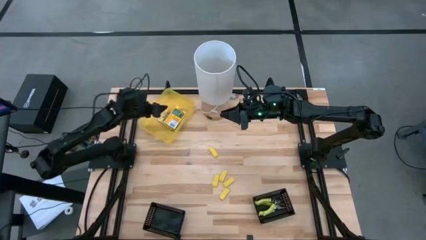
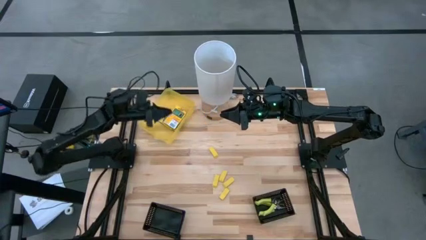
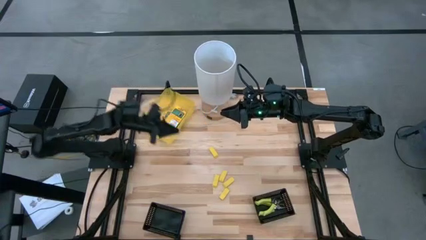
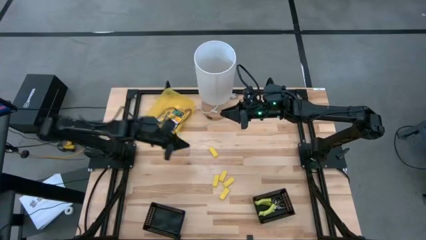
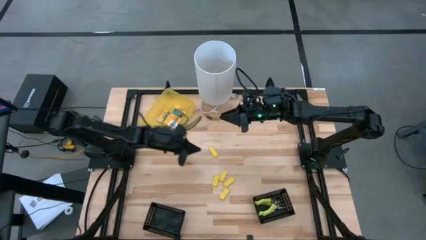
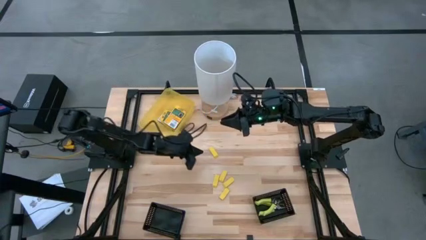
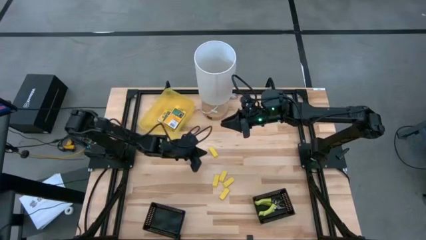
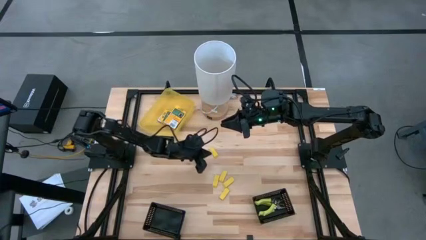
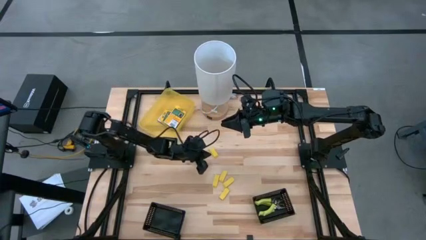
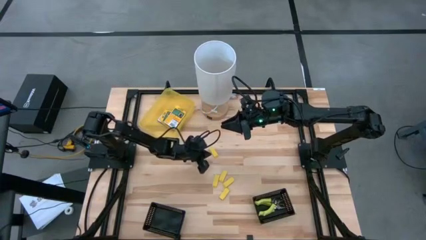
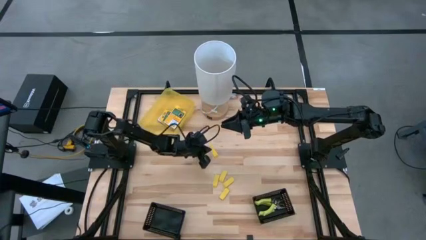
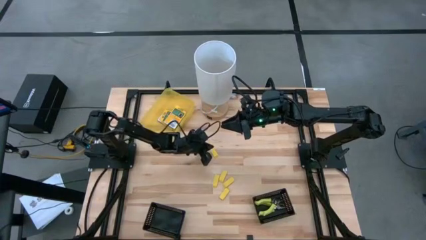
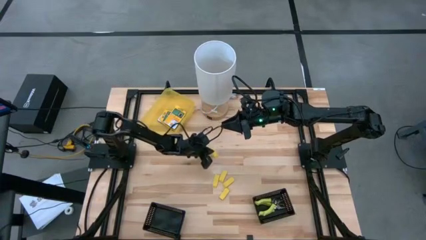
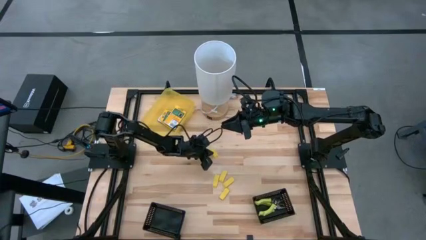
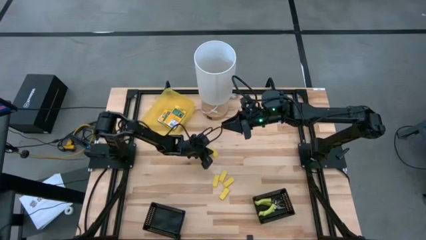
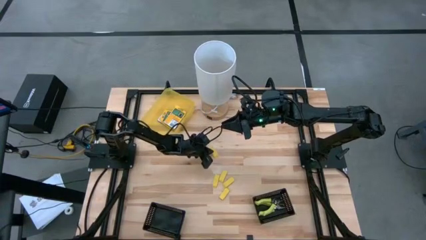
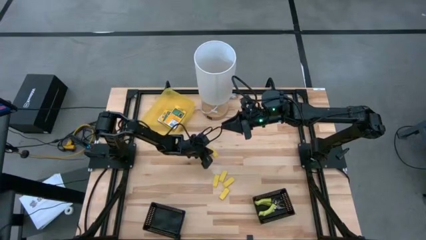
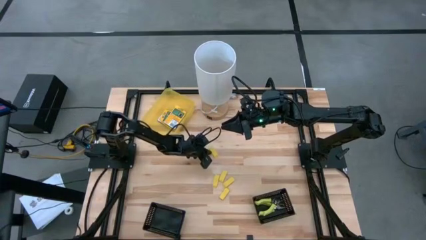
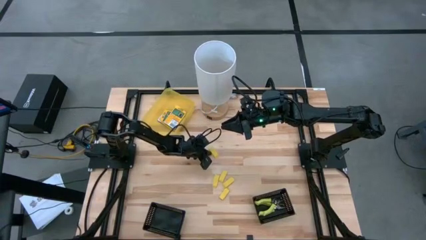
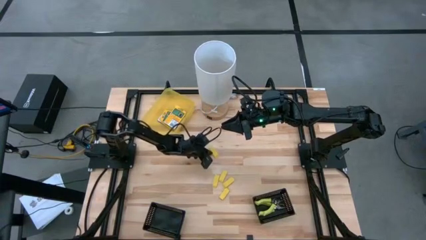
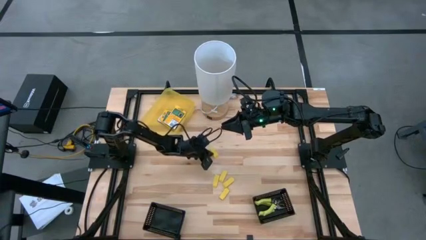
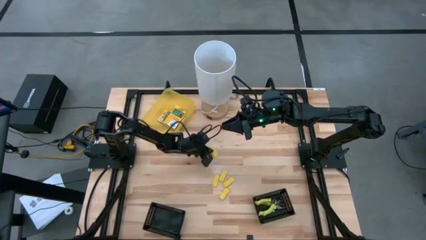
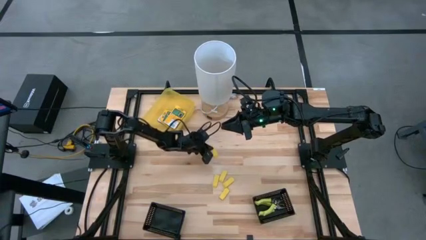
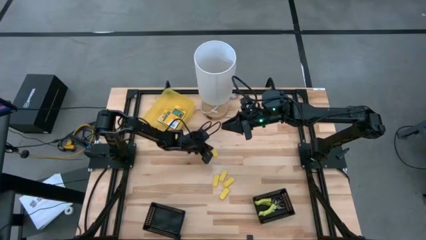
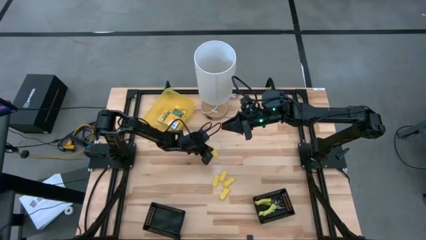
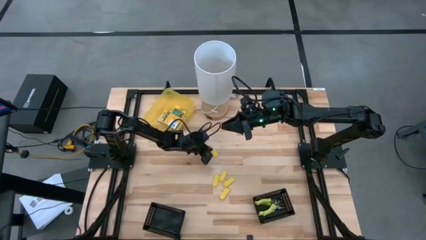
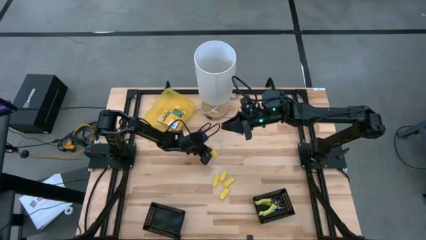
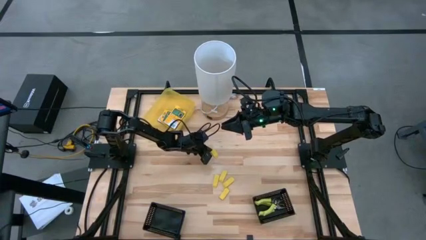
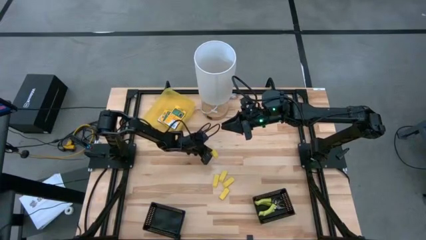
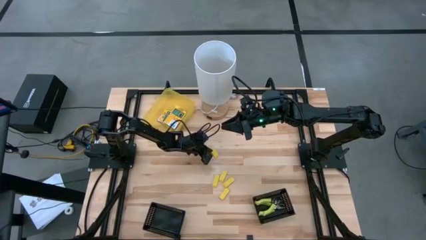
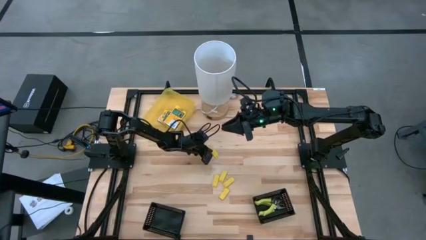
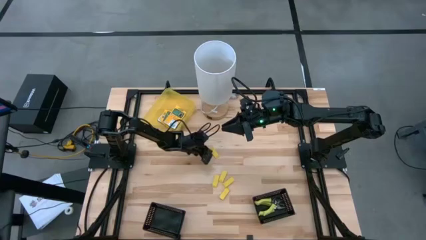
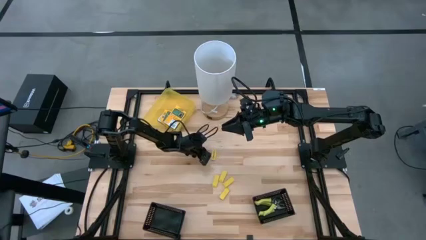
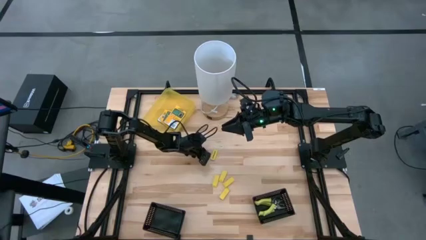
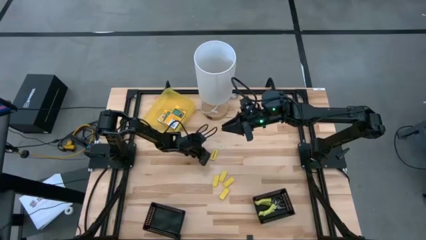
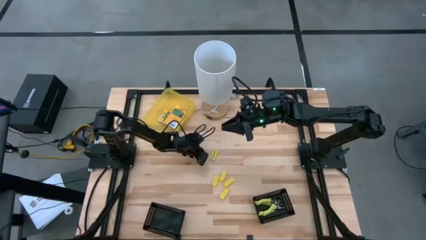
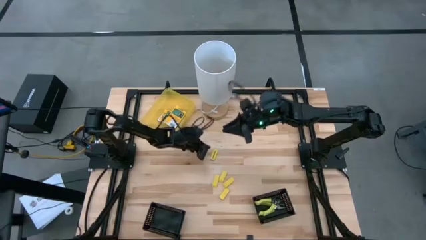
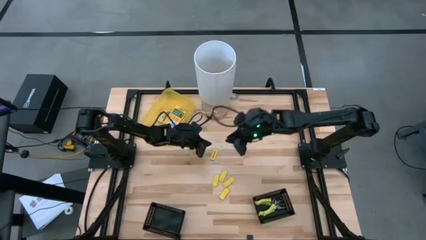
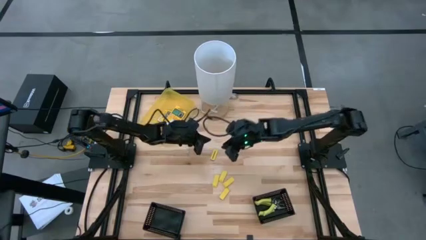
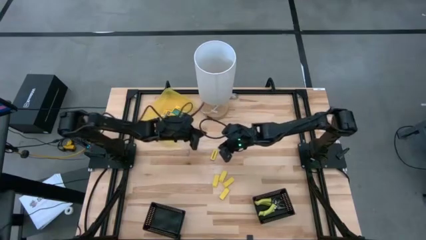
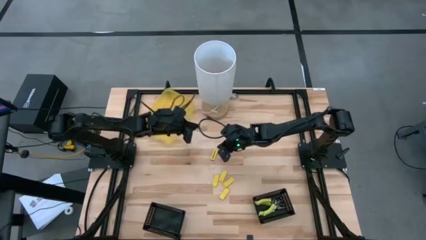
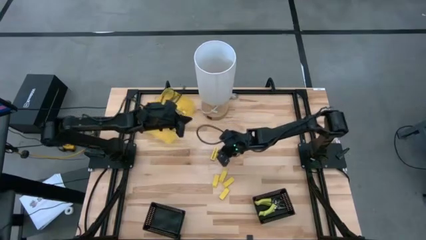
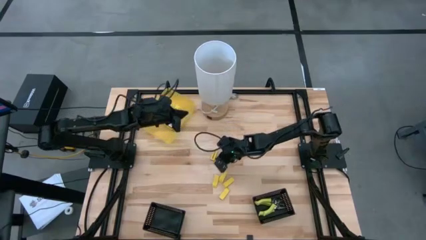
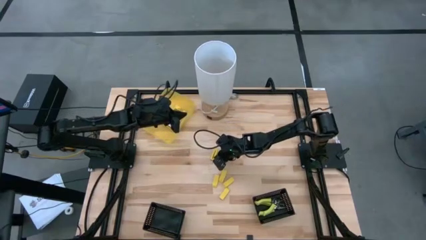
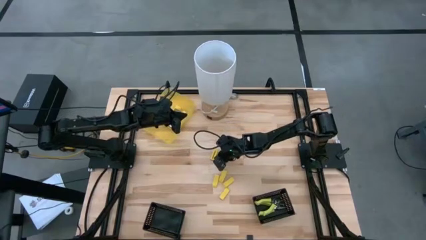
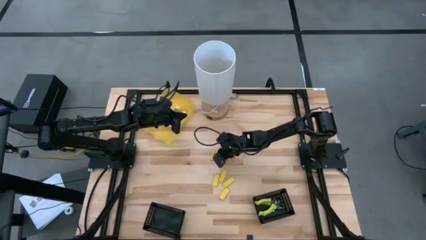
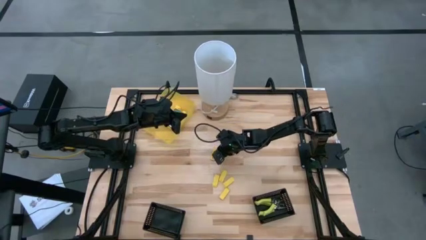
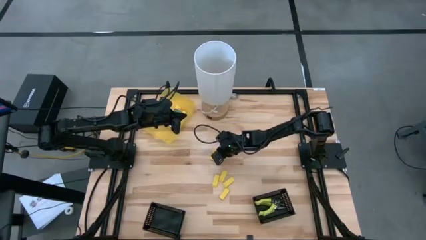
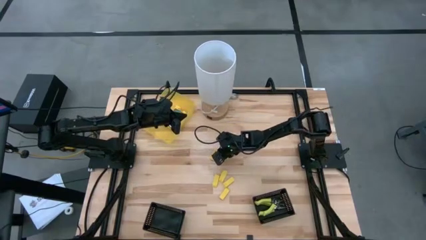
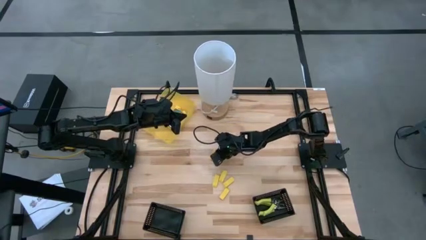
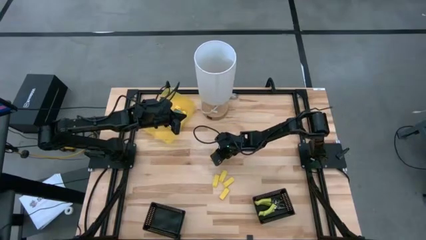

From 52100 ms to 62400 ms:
Task: Pick & Place School Supplies
Put the eraser into the bottom left black bin

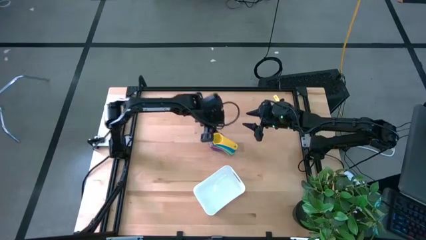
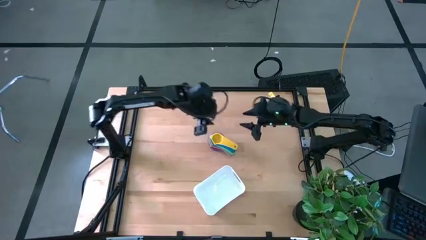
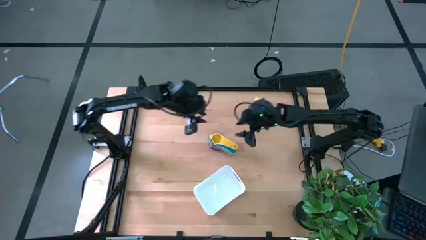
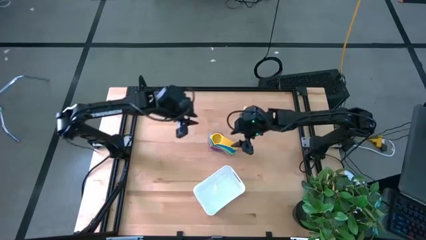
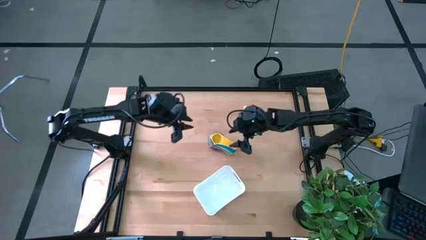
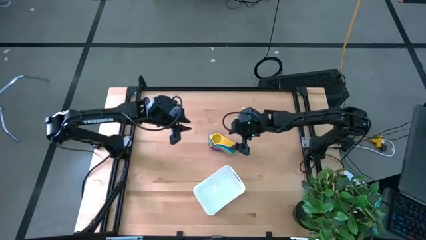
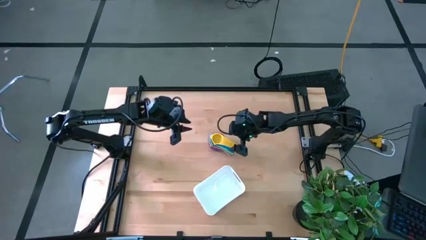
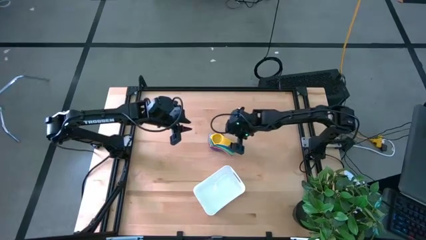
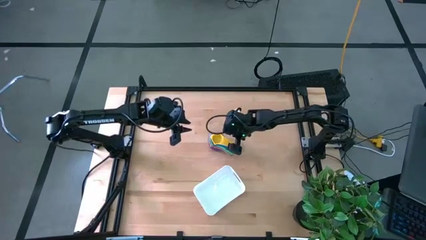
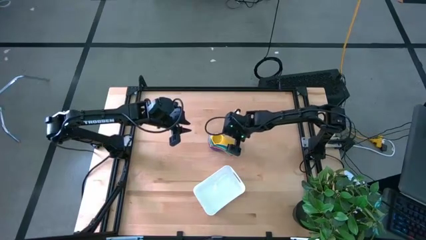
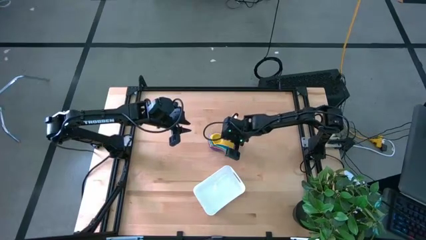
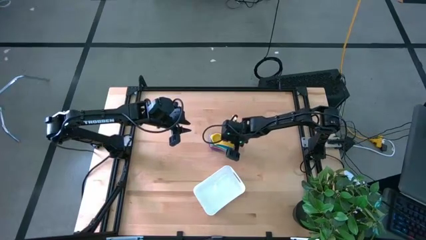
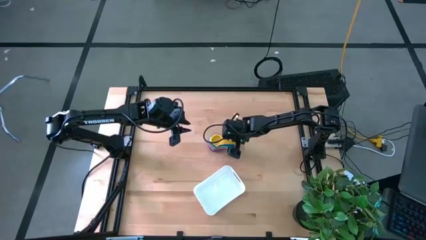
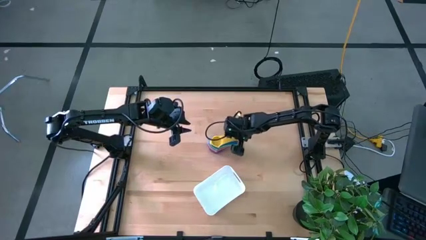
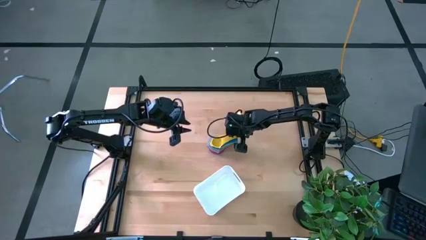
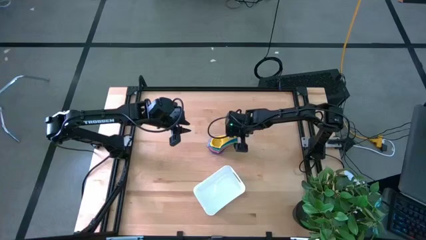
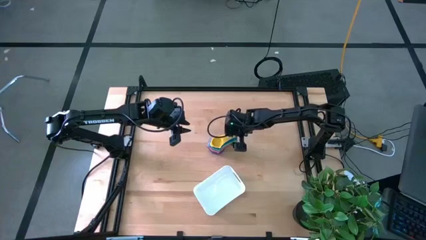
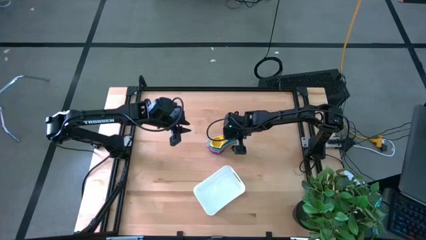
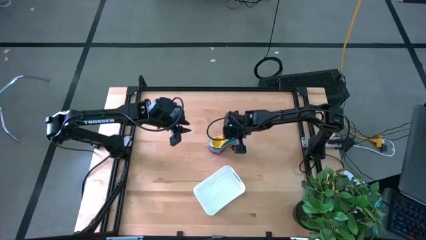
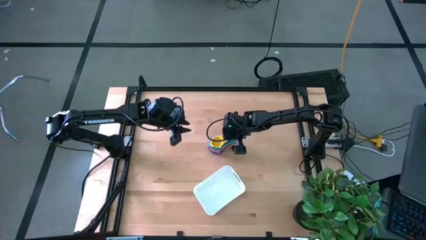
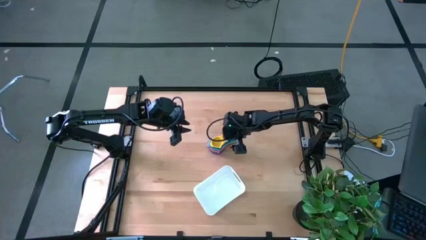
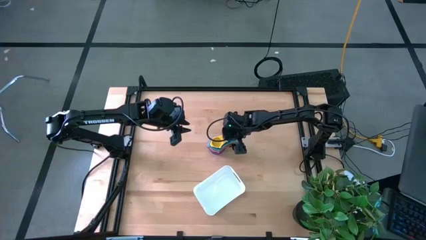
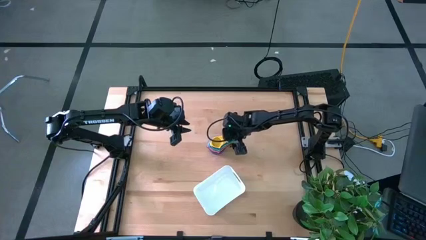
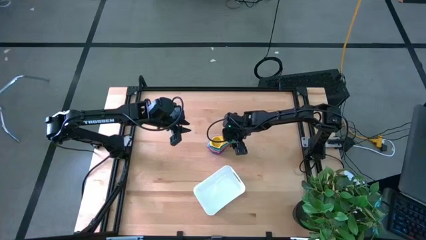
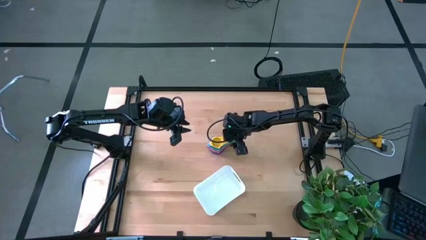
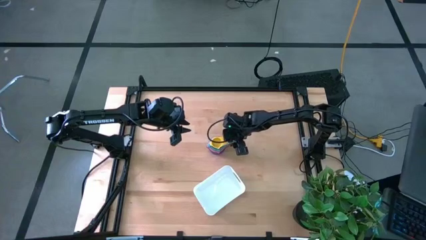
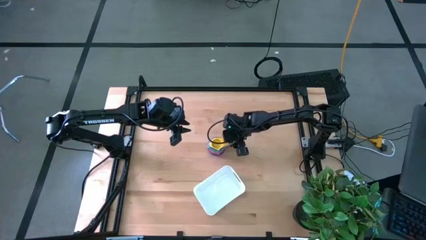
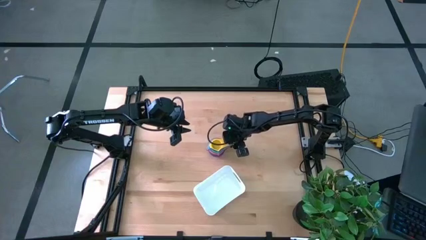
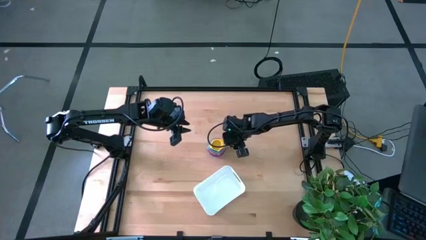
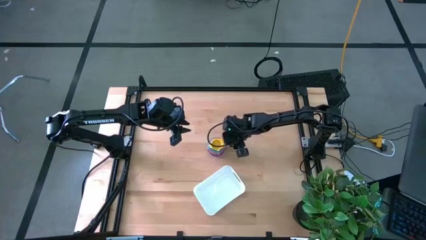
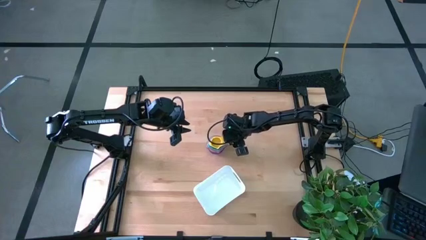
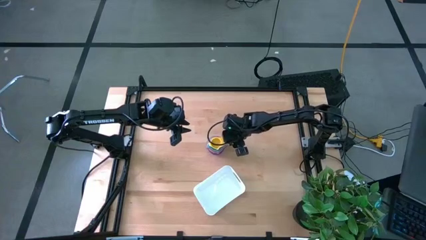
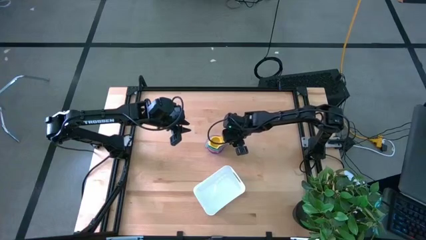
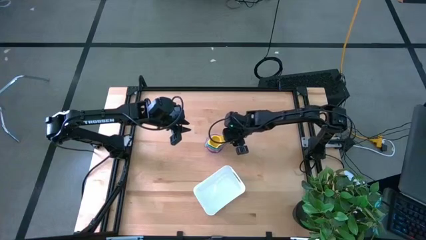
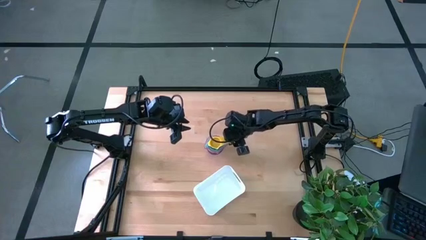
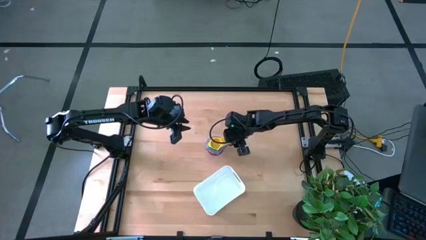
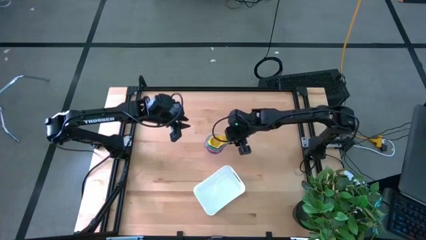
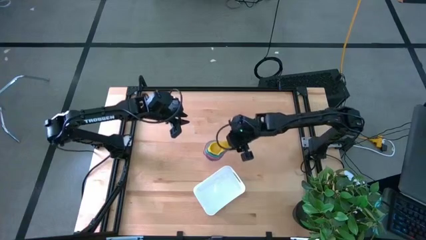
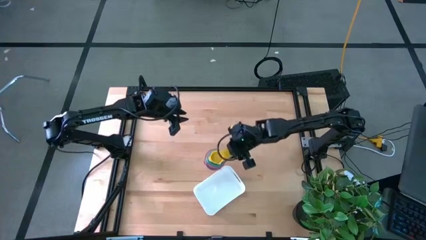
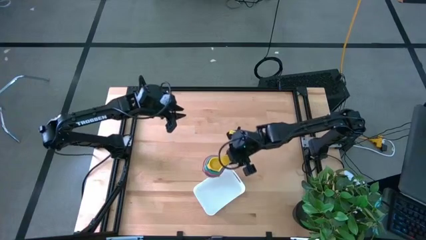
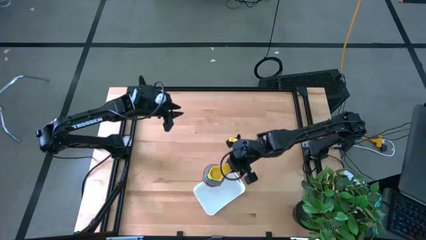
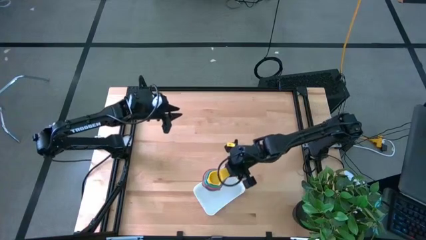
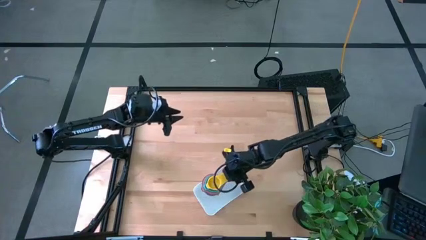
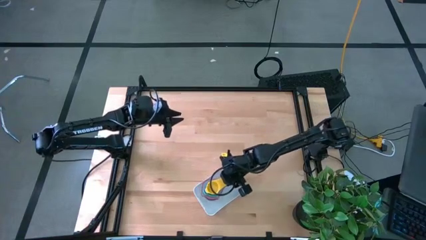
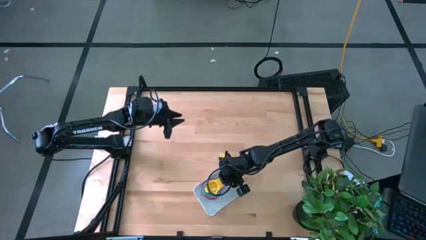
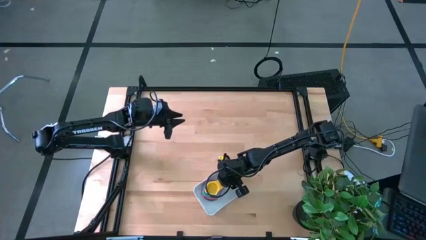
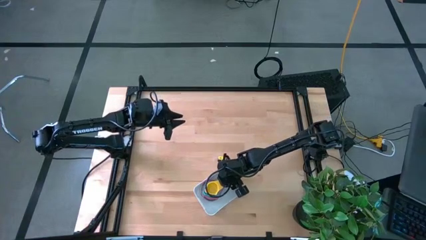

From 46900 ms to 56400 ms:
Task: Nest measuring cups in basket
Put the nested measuring cups into the white bin
